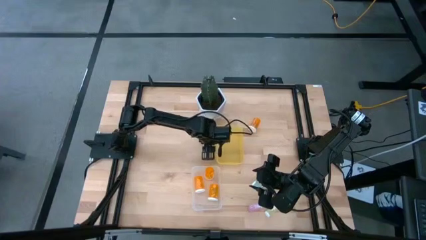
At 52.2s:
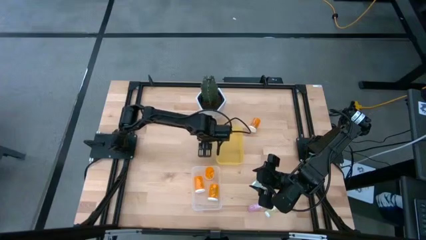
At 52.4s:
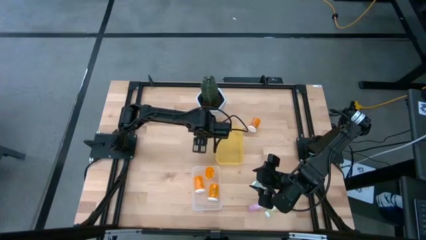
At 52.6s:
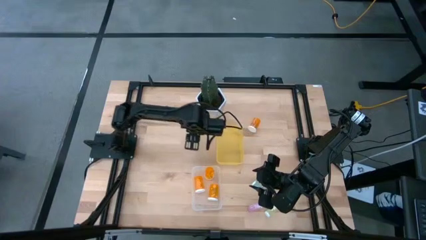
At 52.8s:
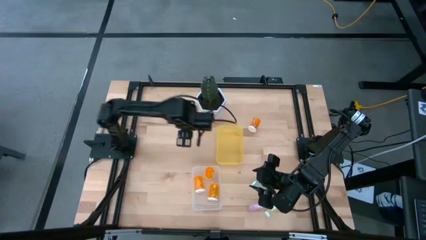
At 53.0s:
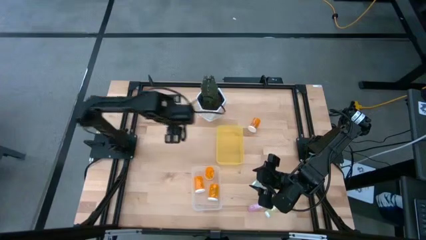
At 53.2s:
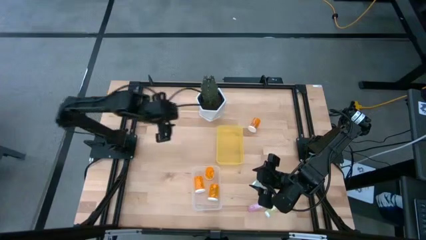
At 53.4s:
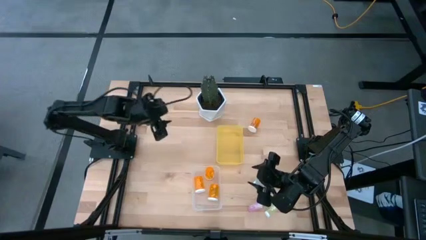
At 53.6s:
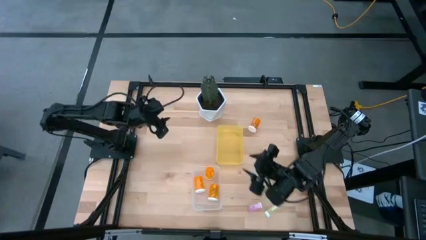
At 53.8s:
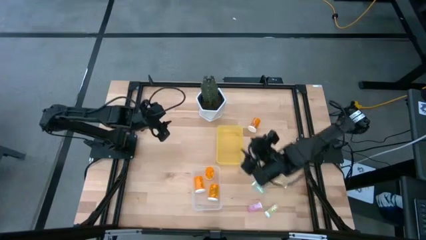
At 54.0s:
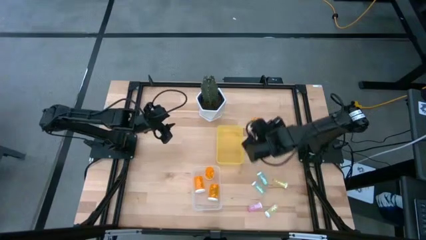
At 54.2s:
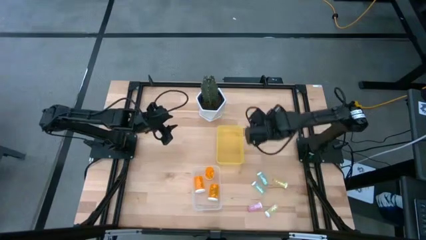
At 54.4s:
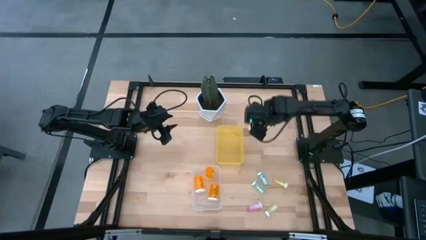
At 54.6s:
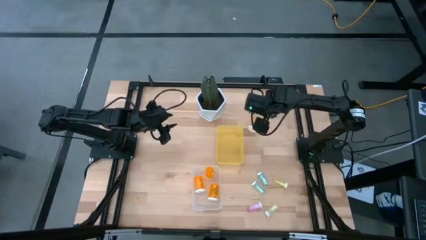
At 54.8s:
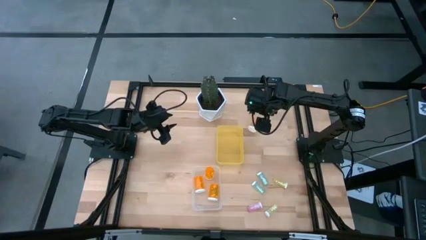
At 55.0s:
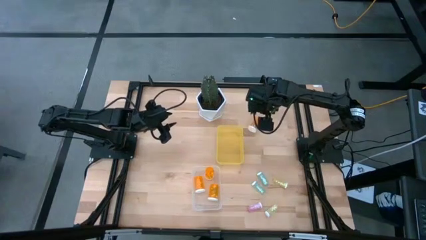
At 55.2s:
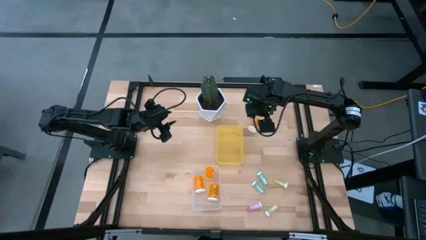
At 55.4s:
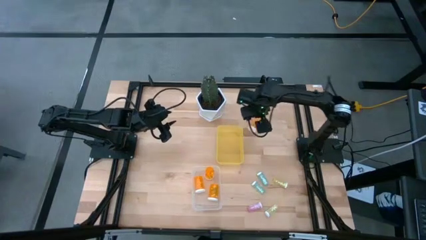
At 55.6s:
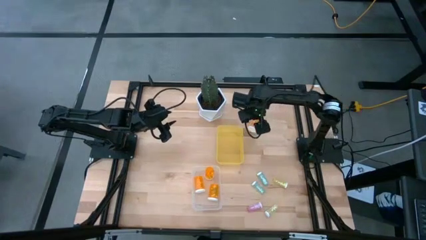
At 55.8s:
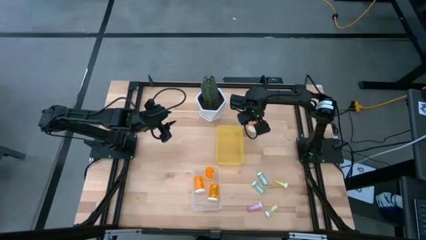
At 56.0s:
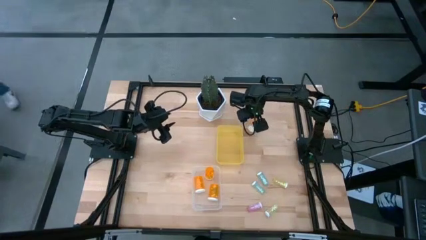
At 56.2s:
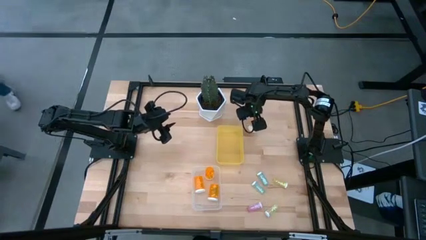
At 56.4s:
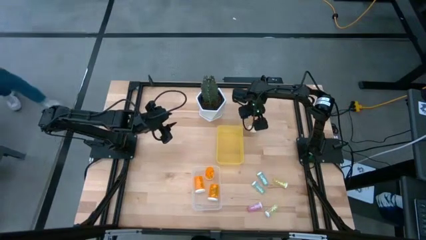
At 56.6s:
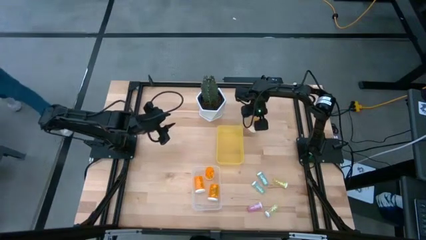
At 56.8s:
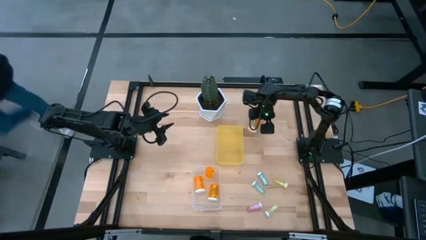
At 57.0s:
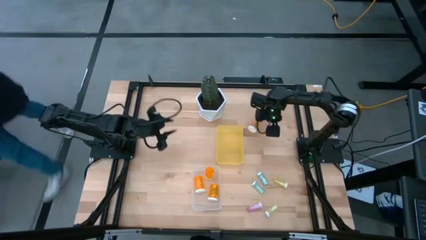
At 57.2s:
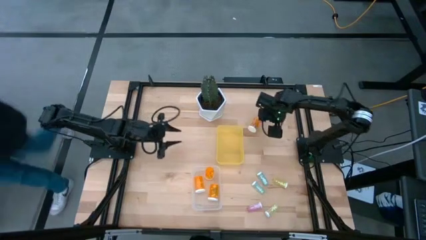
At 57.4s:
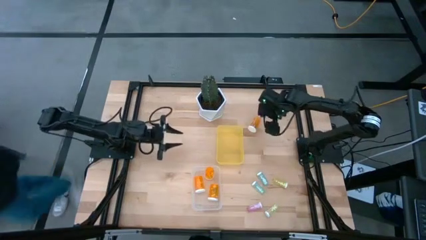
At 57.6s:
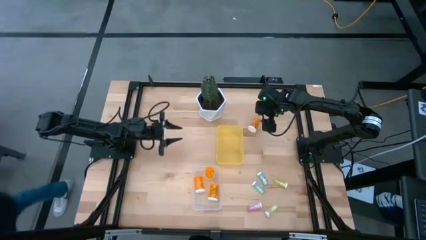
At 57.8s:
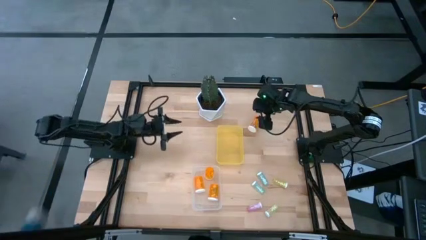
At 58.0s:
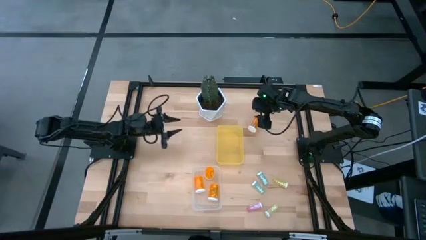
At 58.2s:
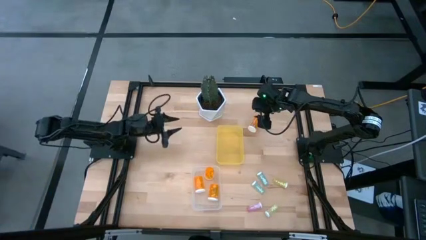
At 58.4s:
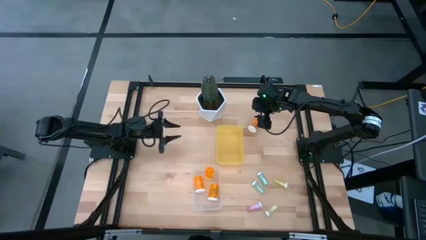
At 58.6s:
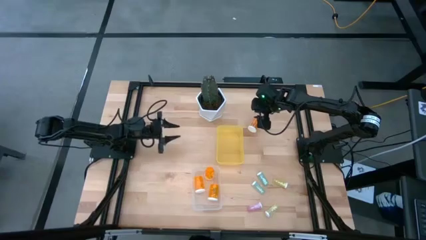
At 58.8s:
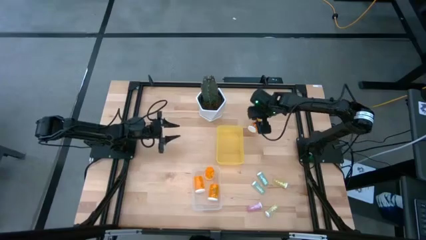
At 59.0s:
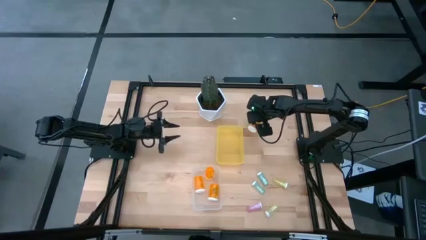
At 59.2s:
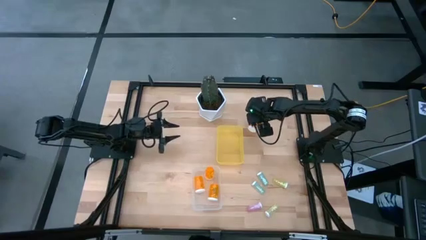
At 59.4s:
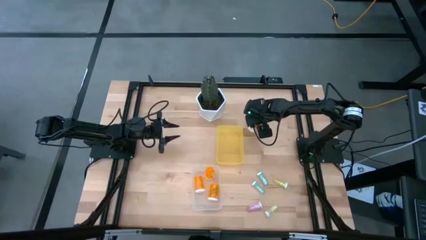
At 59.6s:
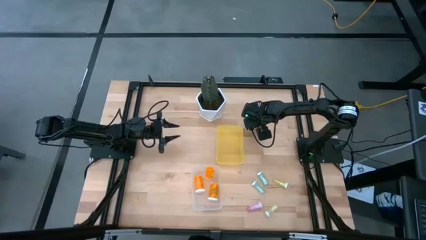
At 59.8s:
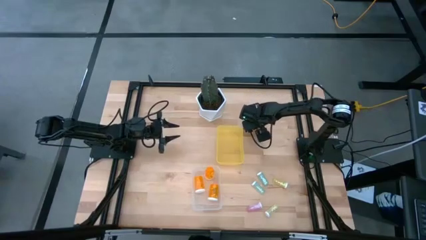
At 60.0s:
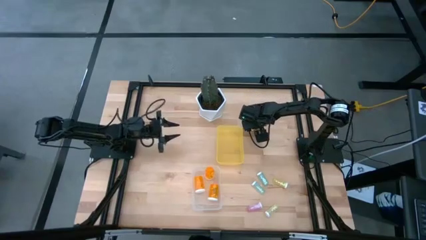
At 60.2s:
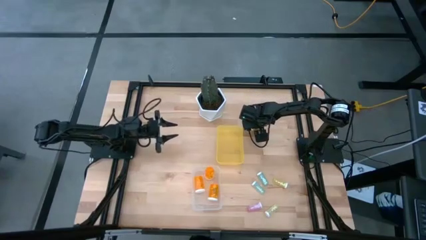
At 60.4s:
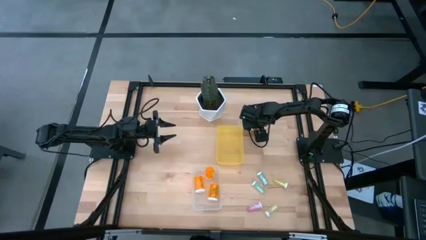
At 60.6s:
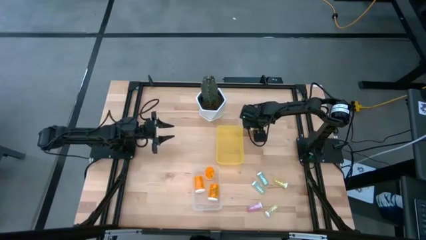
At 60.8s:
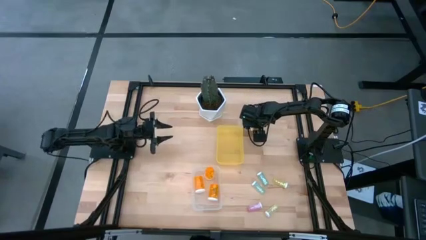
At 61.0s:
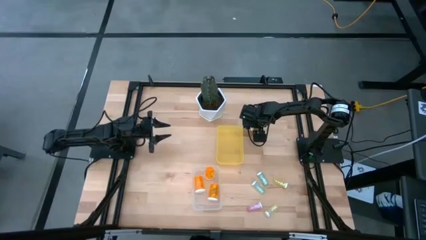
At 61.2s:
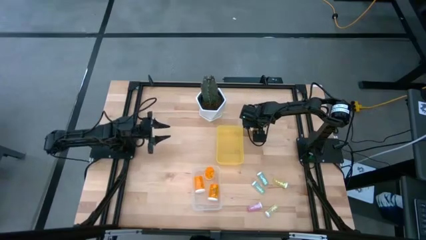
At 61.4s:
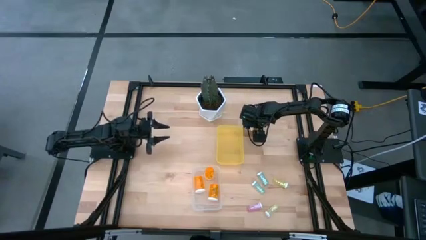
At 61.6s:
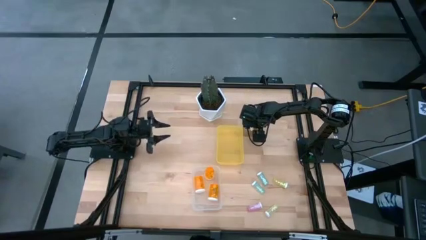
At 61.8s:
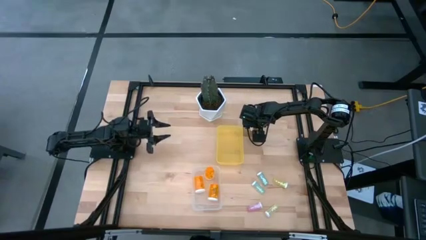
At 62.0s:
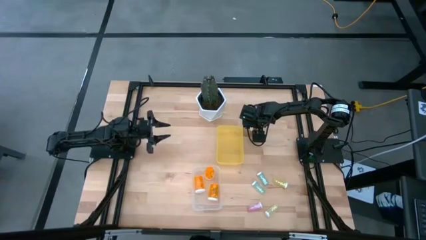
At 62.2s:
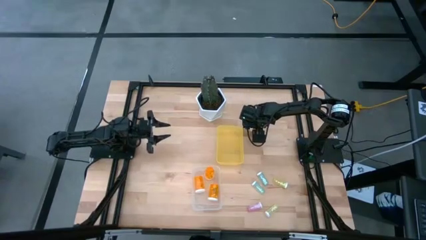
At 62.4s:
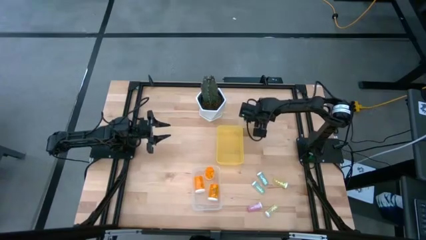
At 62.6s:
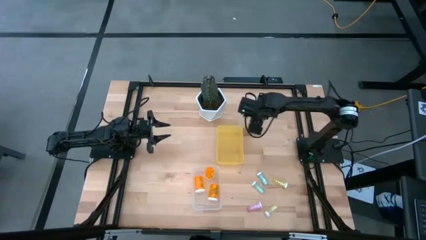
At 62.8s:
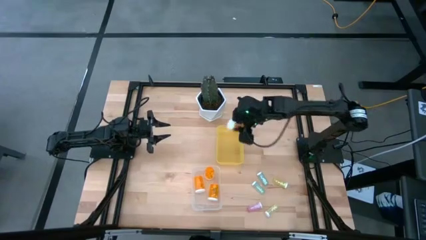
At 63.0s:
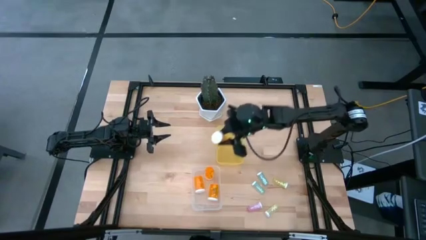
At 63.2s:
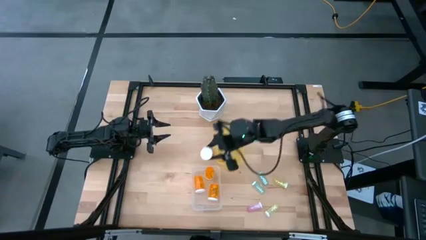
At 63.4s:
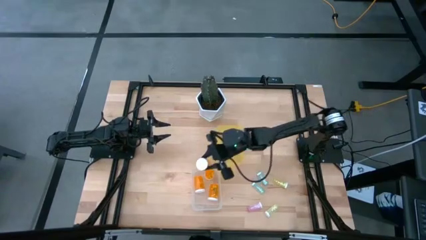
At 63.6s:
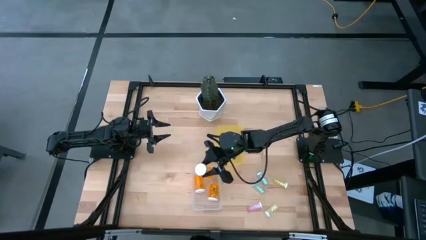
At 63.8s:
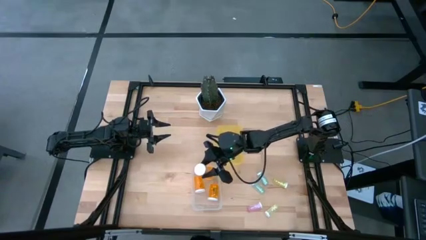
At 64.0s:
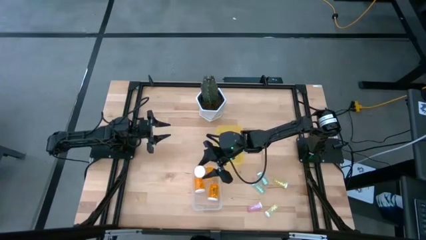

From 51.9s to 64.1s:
Task: Pick and place medicine bottles into bin by pill shape (circle, oval)
Put the large orange pill bottle into the transparent bin

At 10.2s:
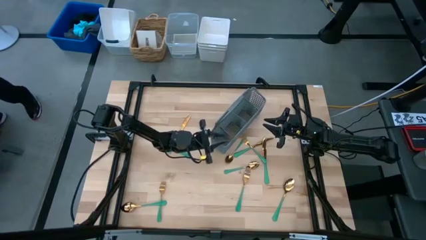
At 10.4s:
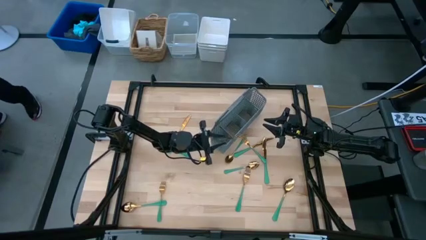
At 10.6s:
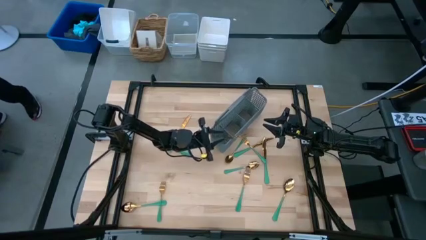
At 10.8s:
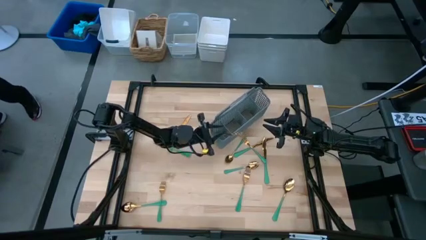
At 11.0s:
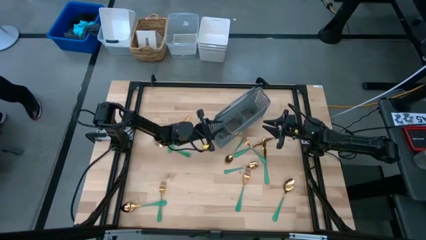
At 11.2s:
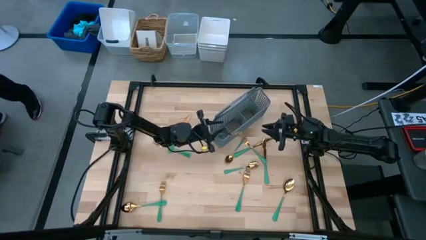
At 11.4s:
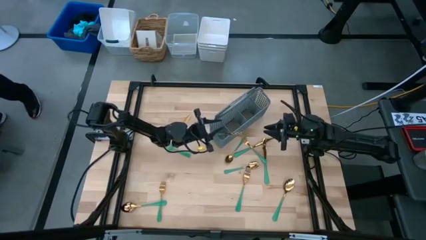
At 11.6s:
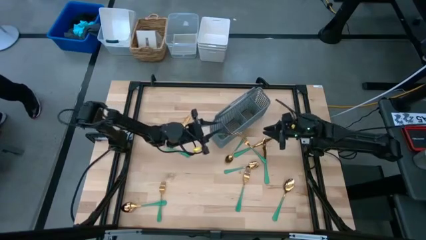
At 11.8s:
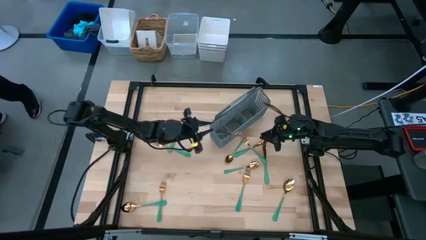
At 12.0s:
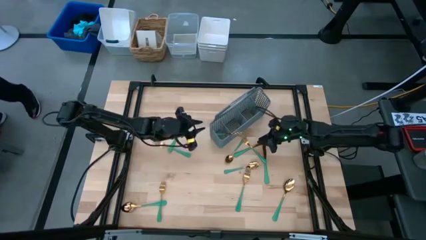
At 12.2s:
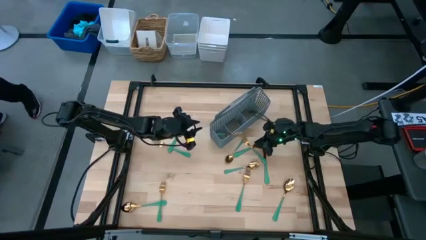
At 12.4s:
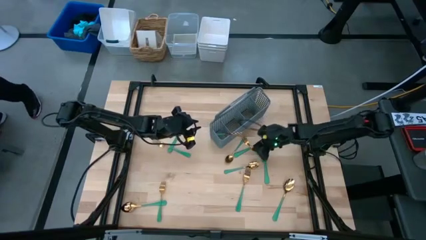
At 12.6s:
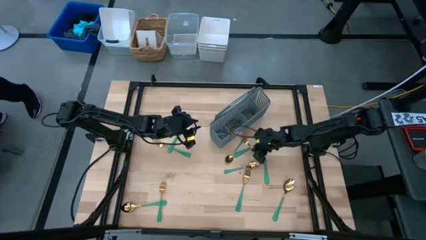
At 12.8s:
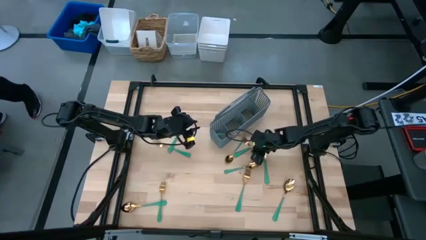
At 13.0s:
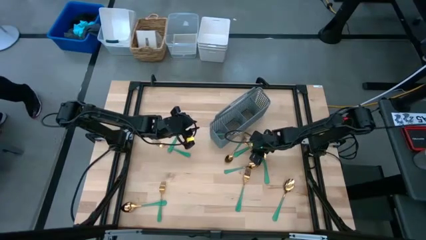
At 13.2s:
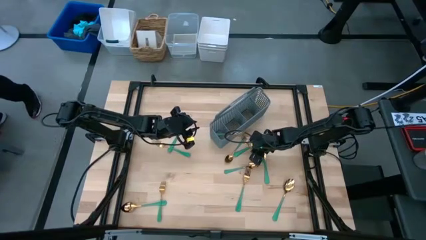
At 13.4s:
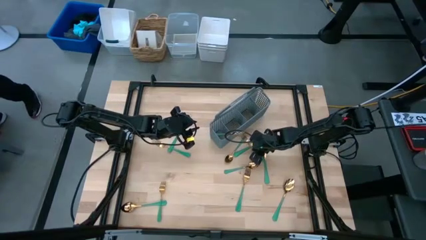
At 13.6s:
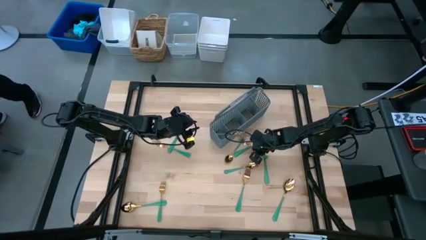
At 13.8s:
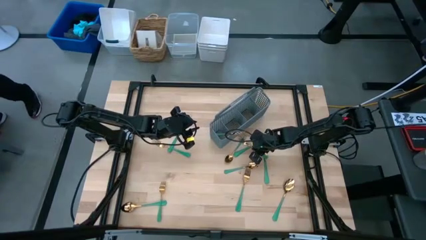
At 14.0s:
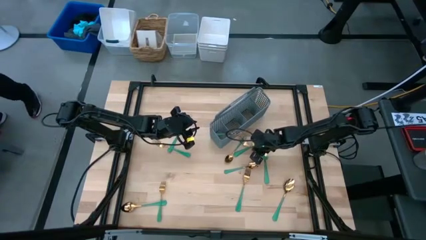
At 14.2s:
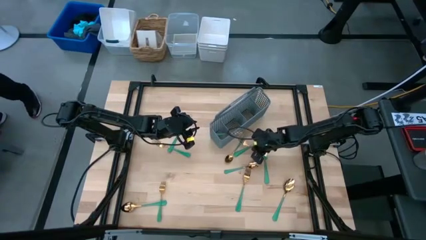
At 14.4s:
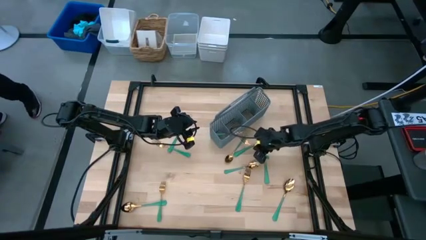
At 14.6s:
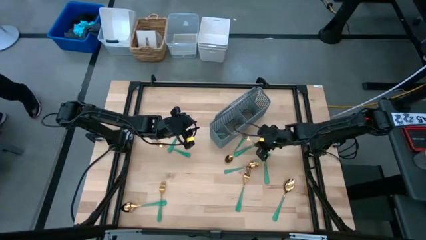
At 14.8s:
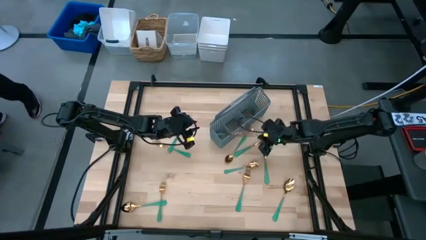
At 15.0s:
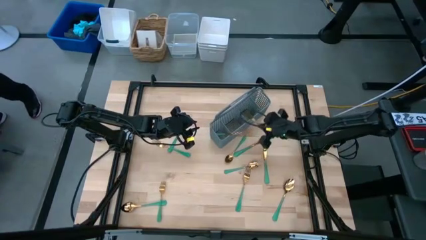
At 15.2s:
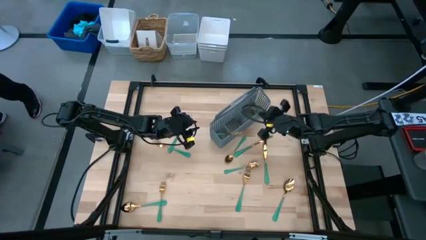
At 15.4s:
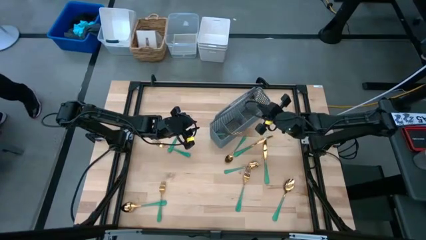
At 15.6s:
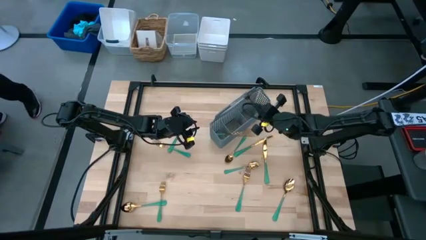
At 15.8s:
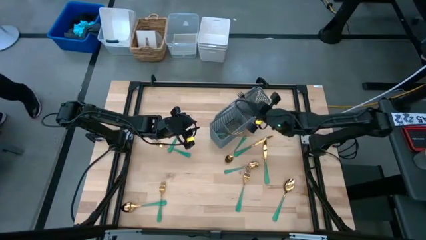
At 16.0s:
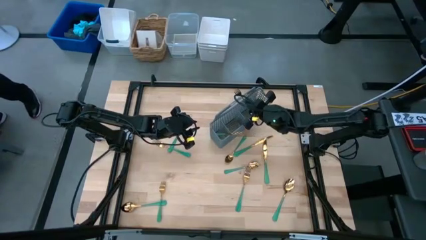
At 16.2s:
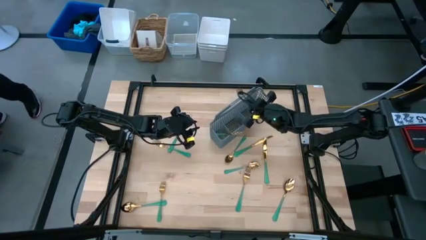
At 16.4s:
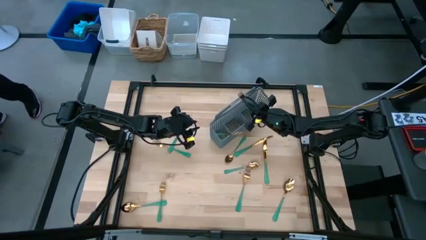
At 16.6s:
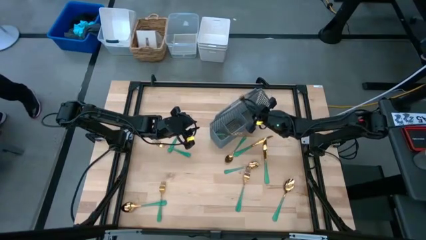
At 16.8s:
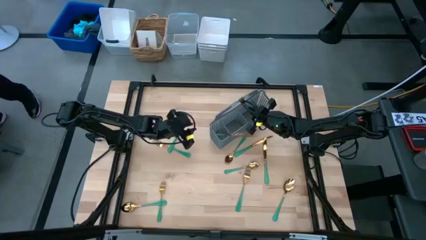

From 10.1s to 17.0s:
Task: Sort silverware
Put the top right fork into the basket
